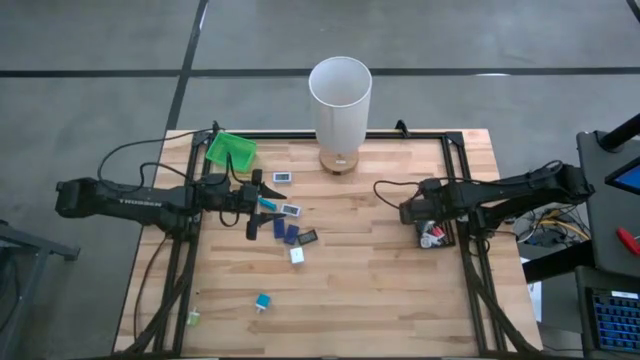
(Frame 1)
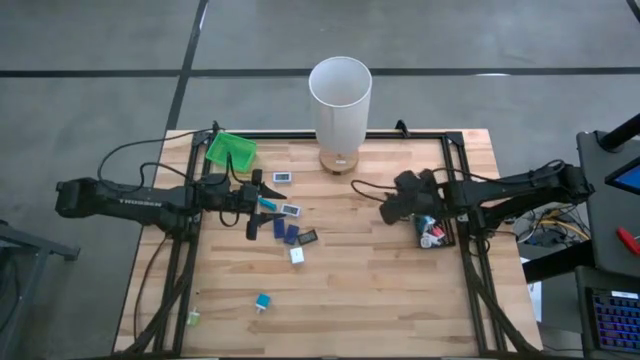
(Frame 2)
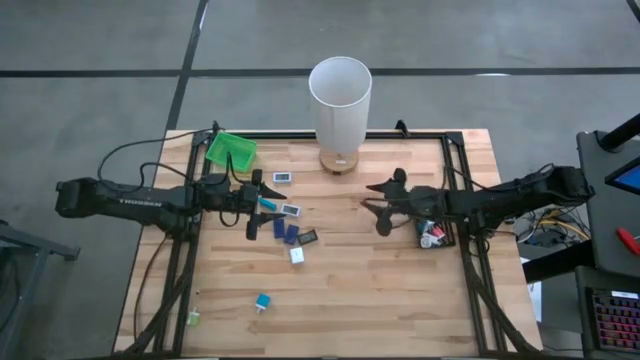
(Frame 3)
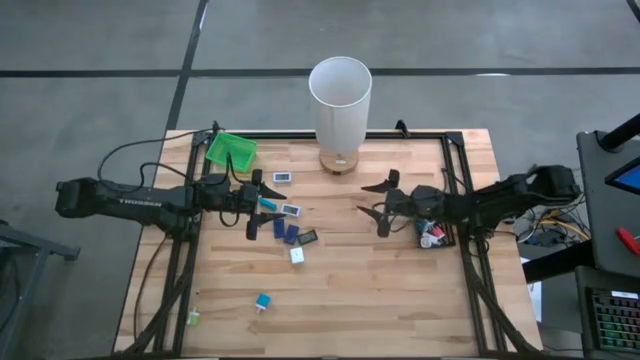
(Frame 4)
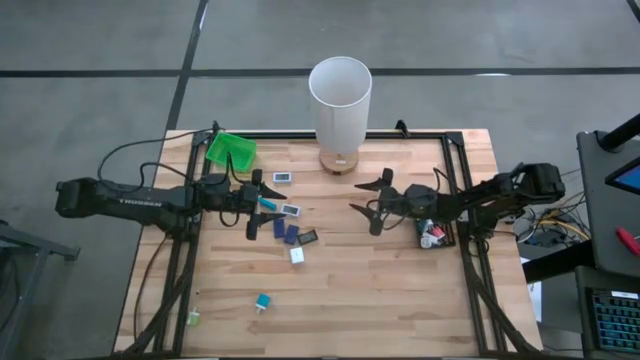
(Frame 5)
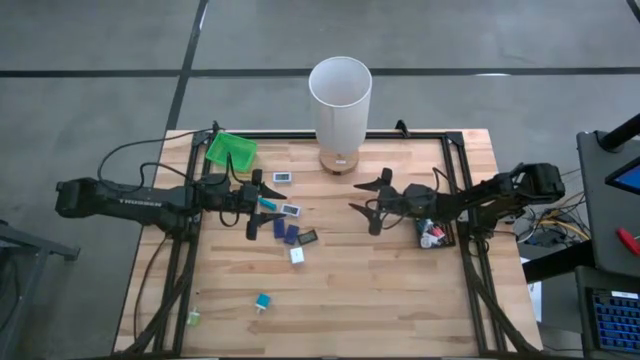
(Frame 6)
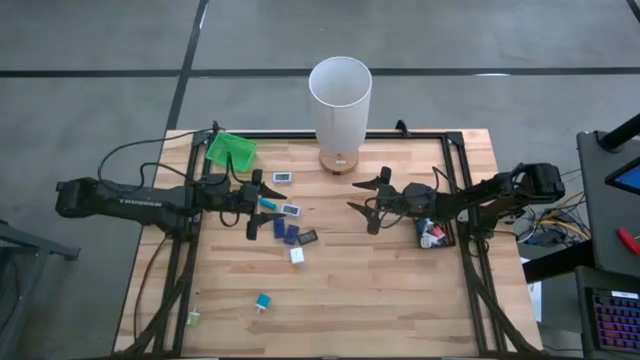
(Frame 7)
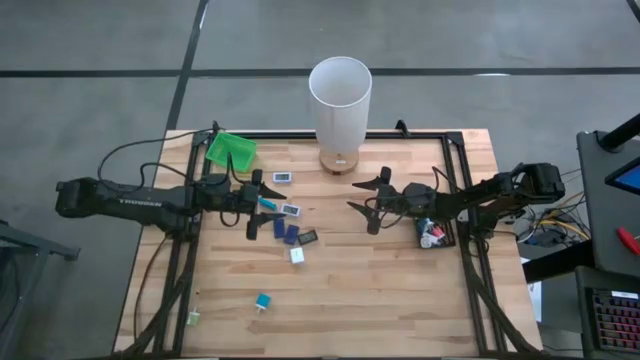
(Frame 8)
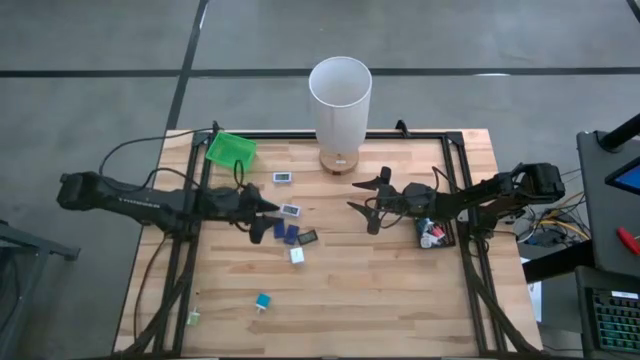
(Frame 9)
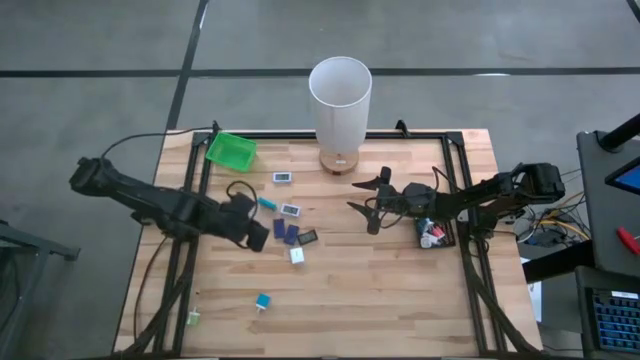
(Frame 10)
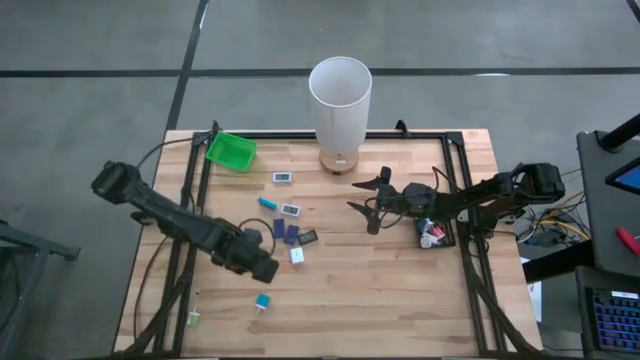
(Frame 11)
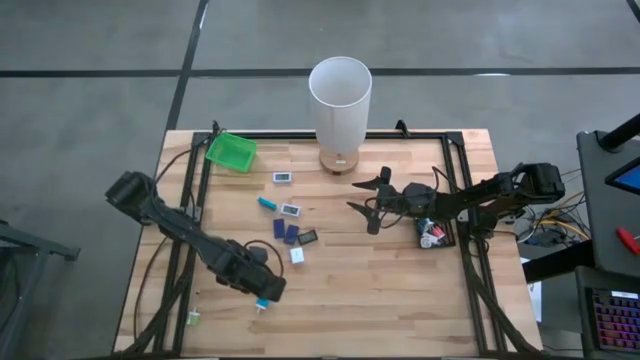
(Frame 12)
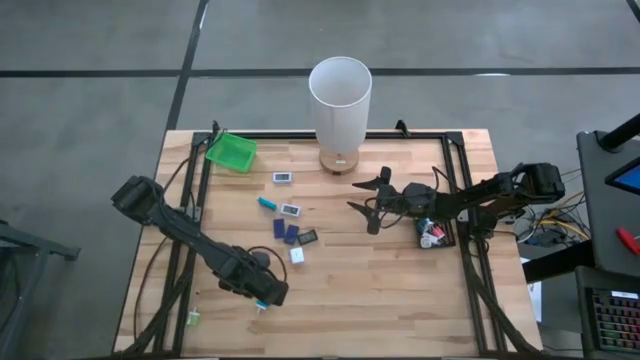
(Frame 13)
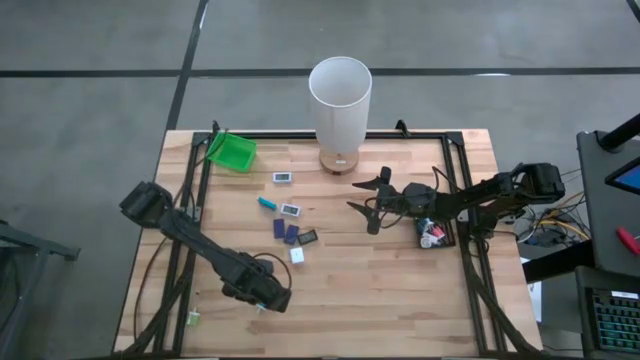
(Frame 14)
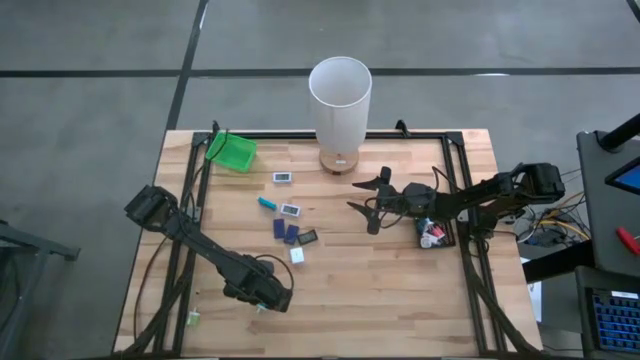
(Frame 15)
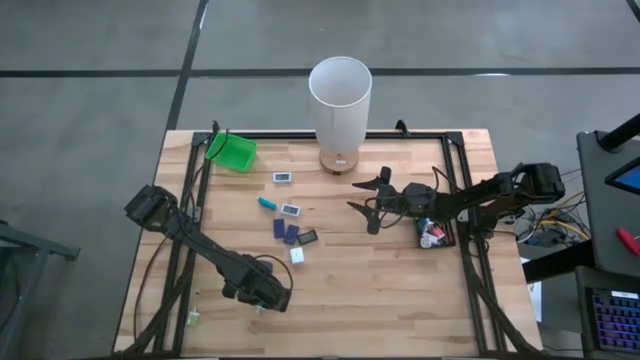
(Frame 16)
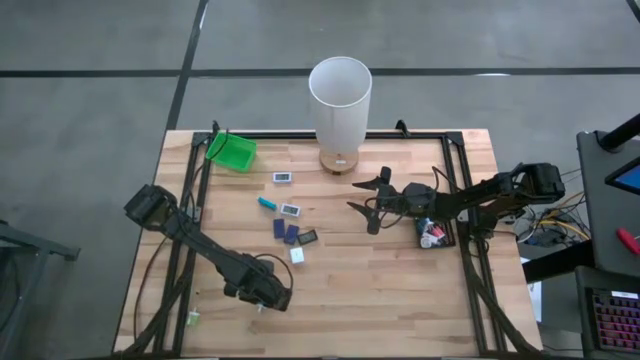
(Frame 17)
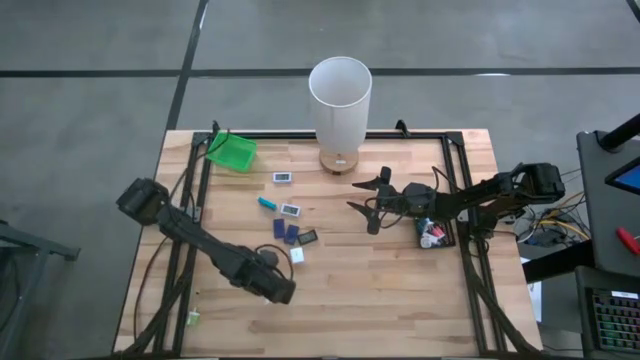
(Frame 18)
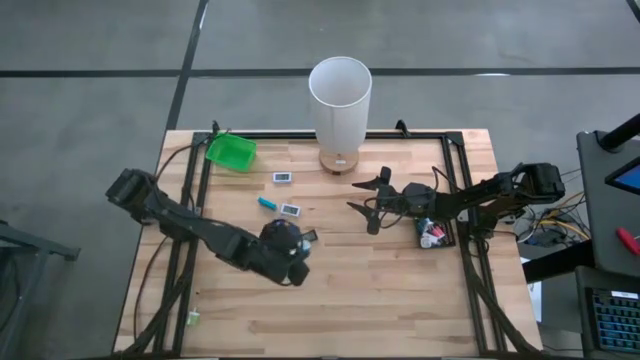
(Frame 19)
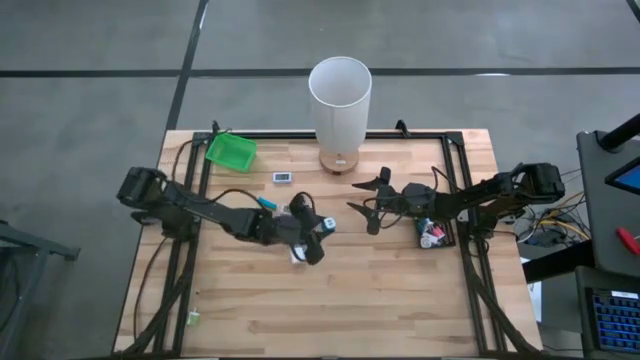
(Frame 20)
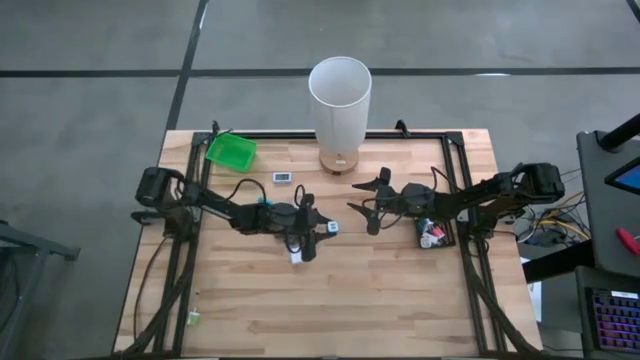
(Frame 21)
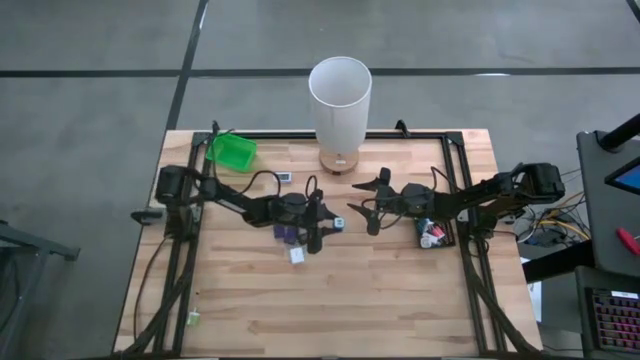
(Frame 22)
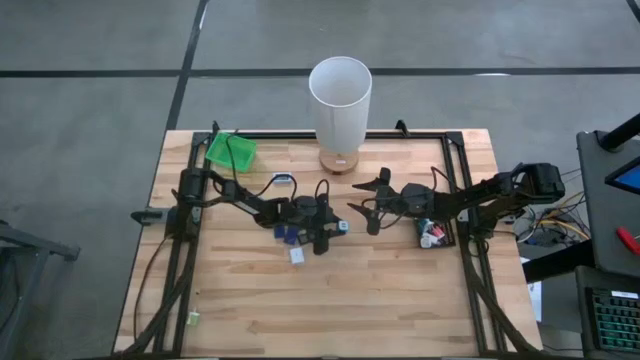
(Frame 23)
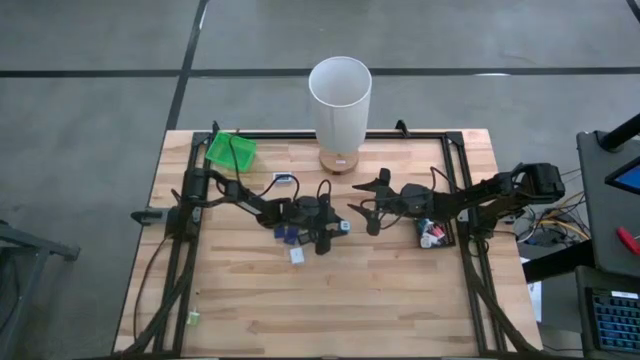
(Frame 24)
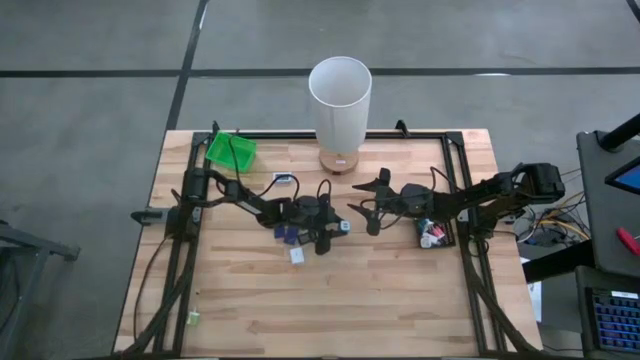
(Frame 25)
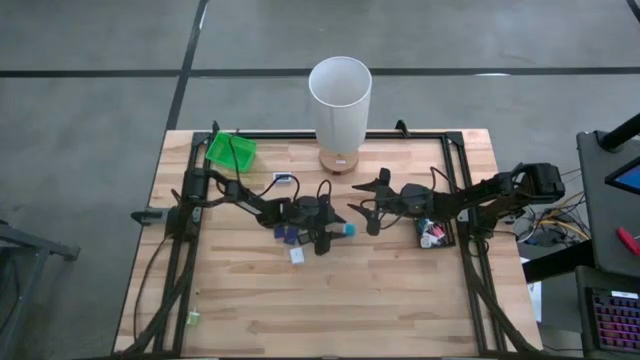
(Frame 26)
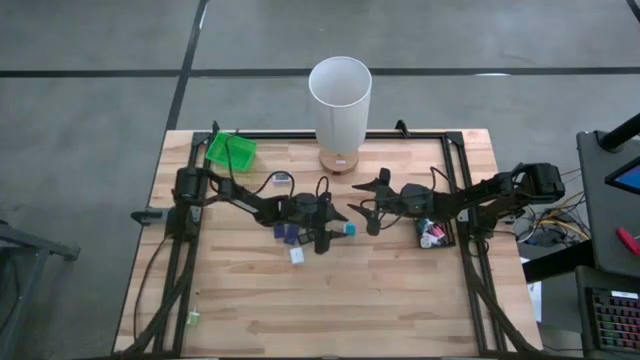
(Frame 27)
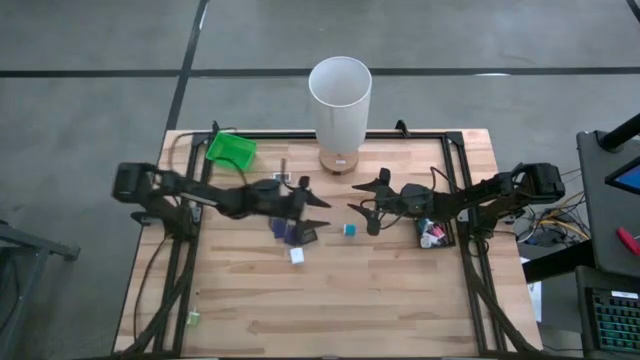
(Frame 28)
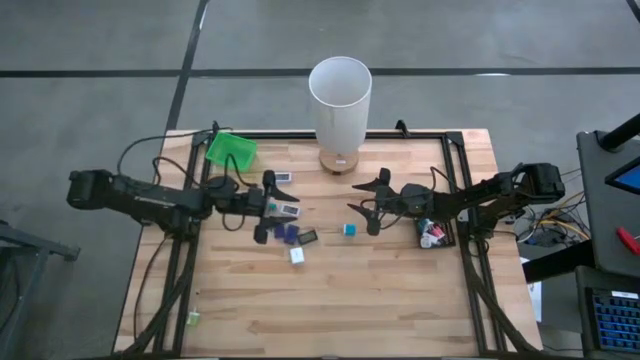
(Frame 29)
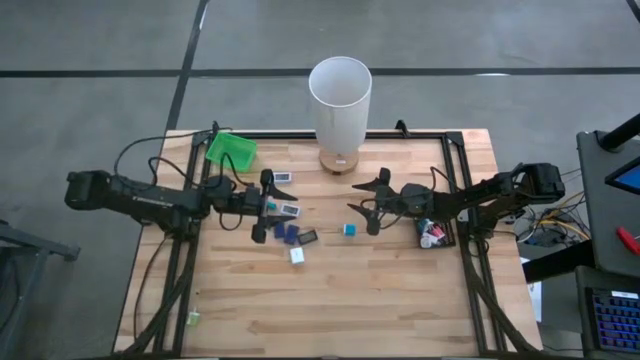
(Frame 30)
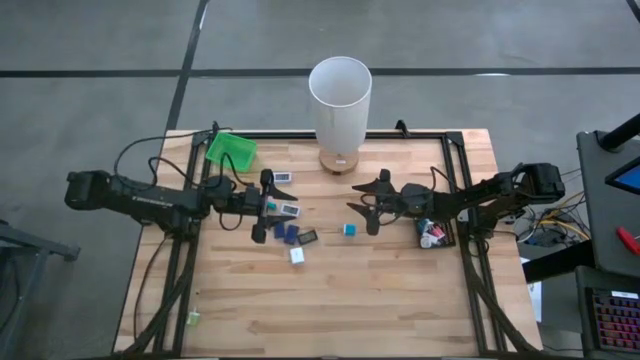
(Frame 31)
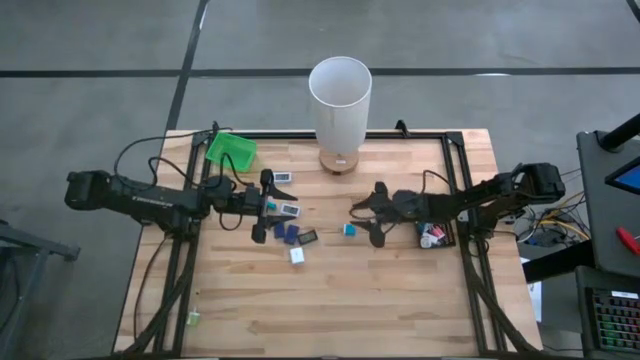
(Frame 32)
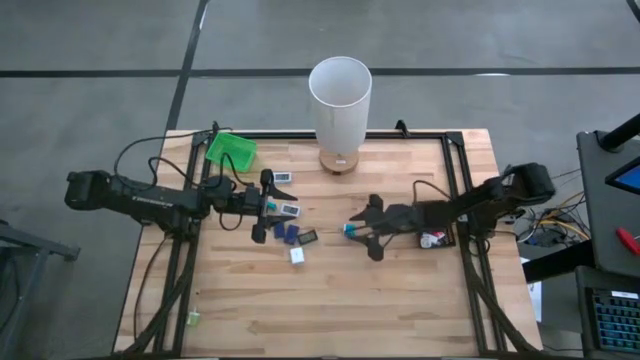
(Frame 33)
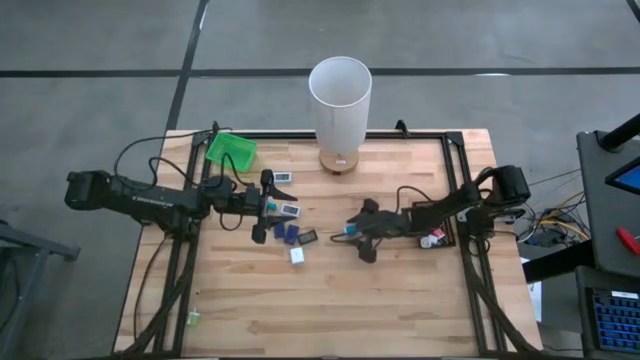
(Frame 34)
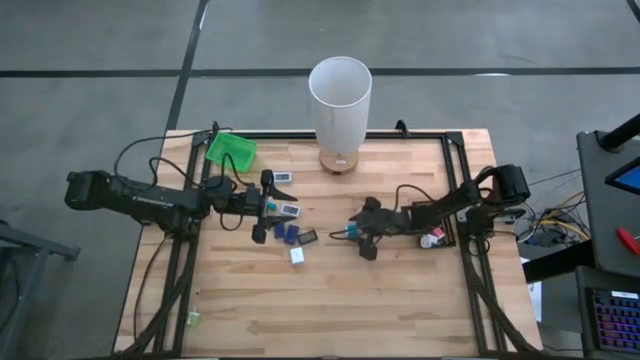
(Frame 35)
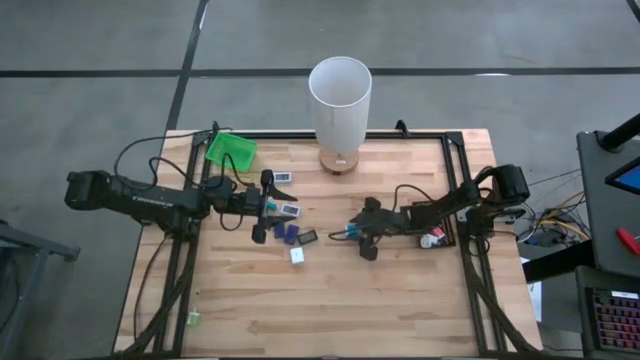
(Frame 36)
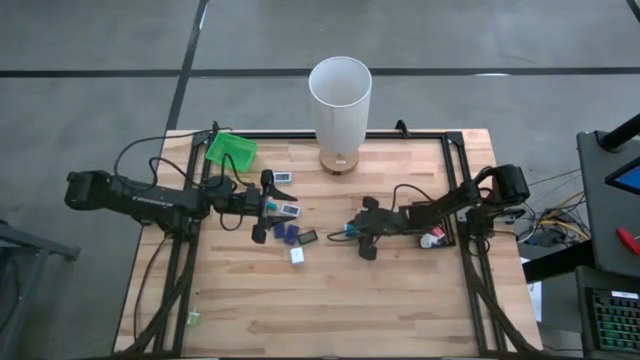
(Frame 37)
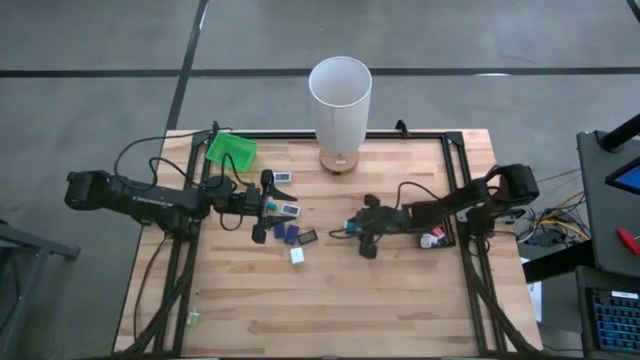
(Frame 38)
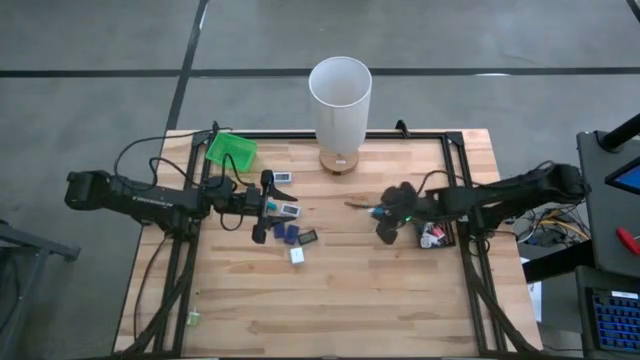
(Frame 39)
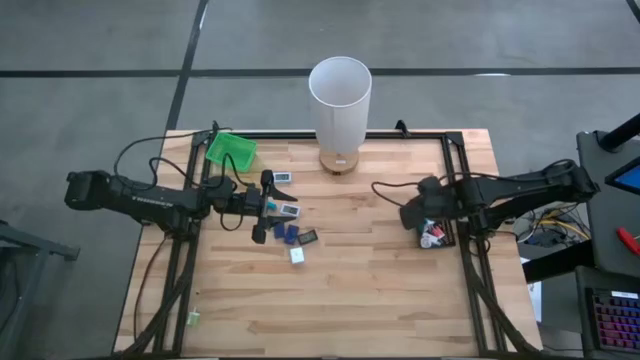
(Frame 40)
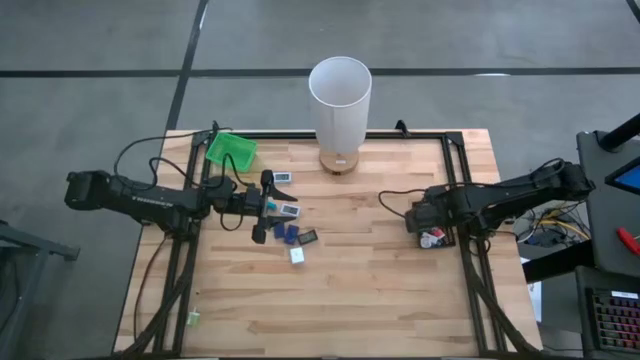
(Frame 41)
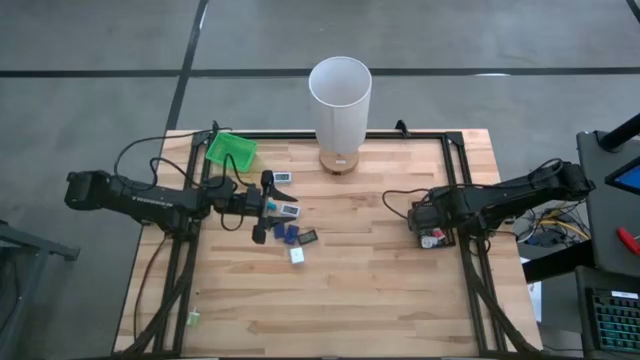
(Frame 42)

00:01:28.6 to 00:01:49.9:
Task: Pick & Place Office items
Put the blue charger adapter into the black bin

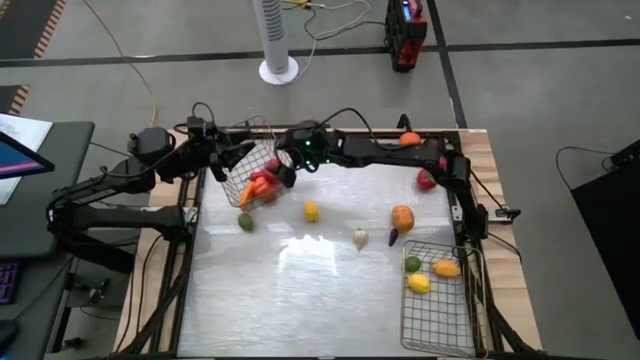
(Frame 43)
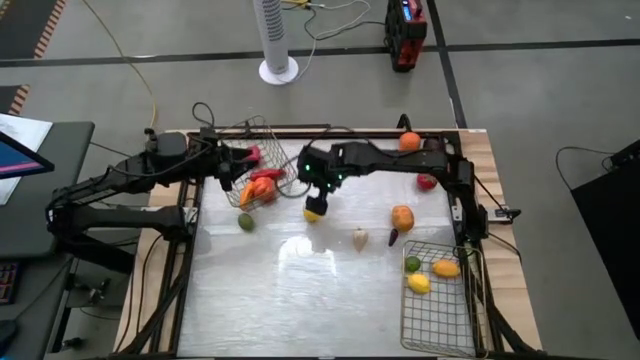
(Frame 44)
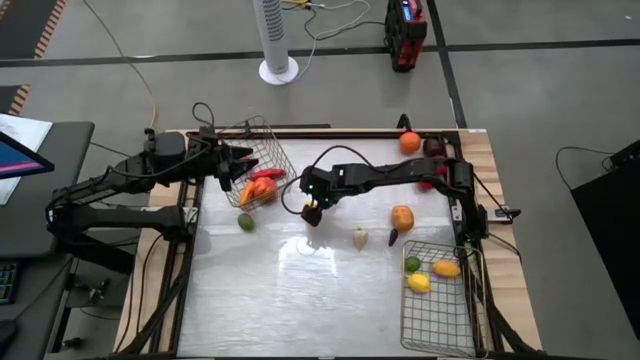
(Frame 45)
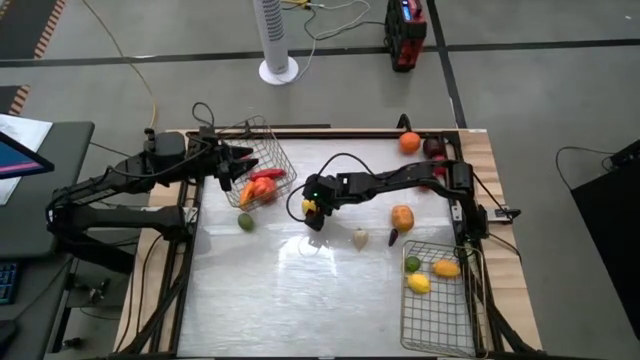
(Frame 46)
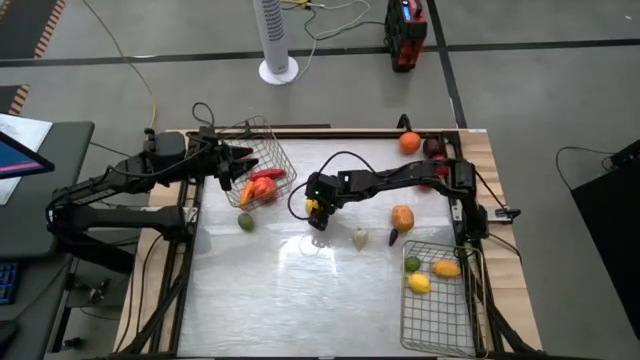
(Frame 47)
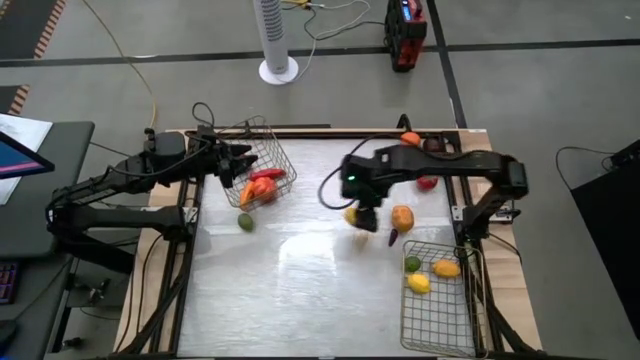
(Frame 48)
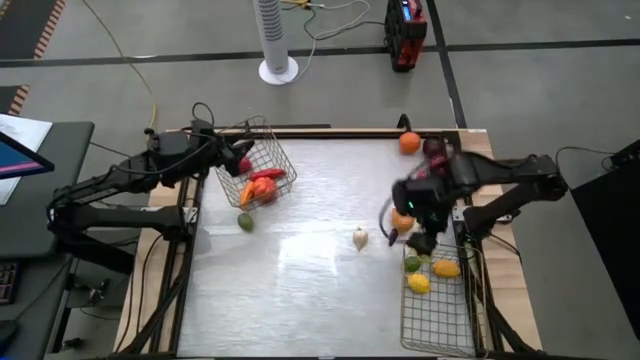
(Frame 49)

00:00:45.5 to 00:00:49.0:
Task: Sort produce into baskets
Put the lemon into the bottom wire basket
